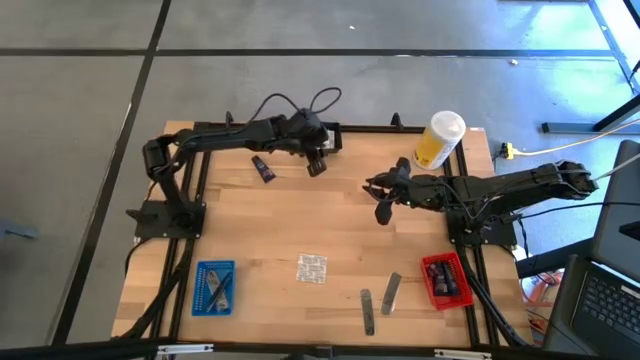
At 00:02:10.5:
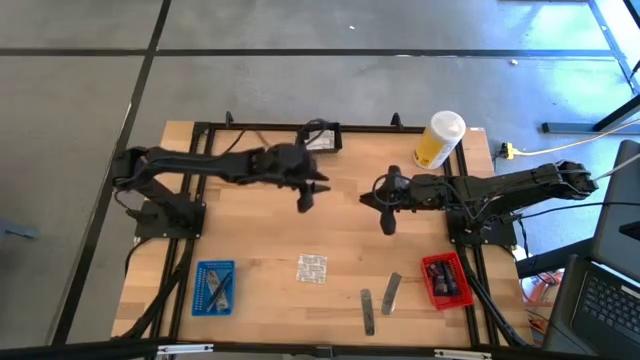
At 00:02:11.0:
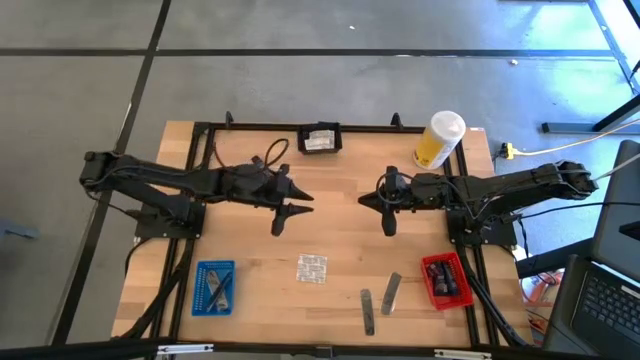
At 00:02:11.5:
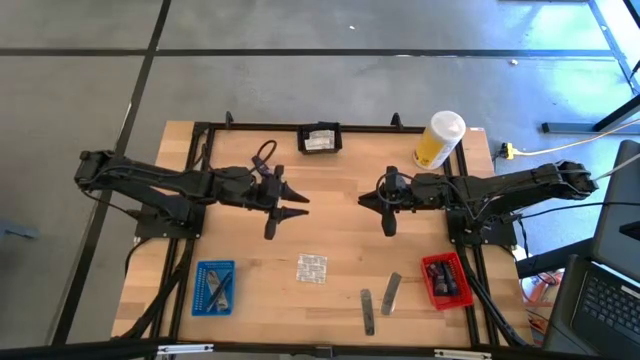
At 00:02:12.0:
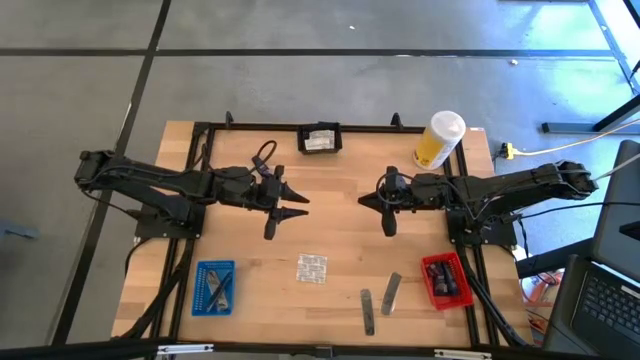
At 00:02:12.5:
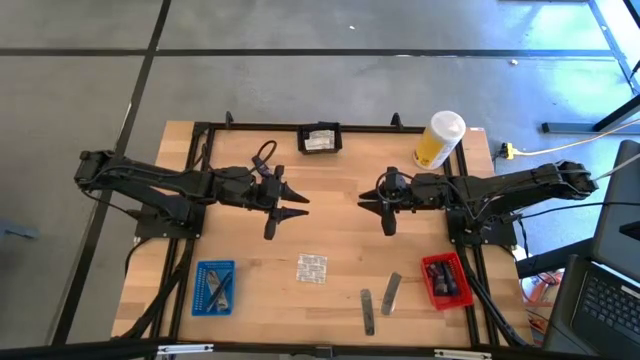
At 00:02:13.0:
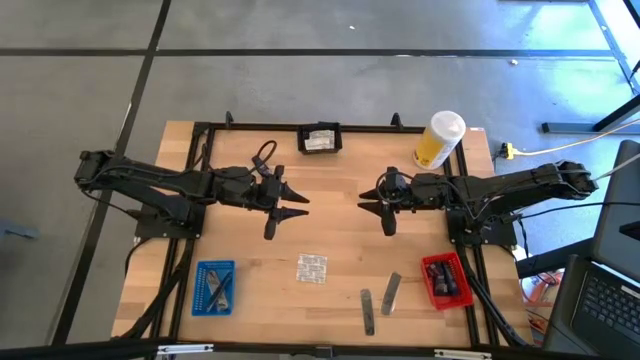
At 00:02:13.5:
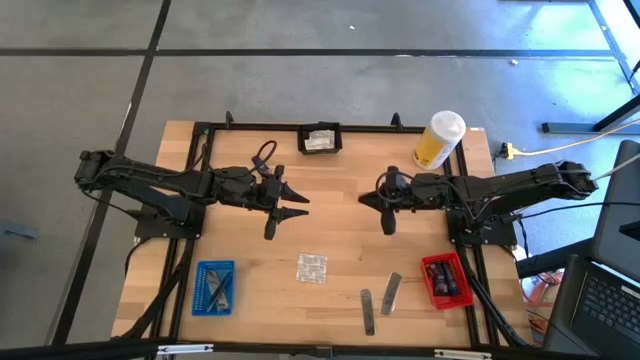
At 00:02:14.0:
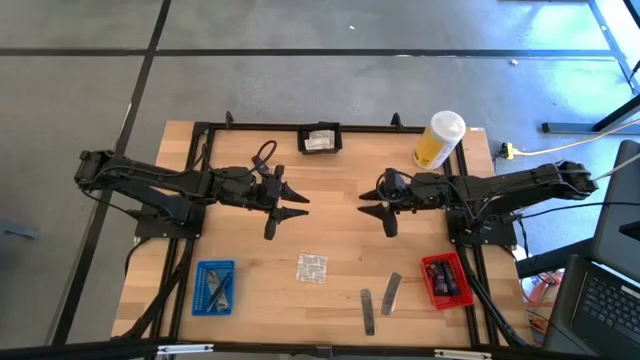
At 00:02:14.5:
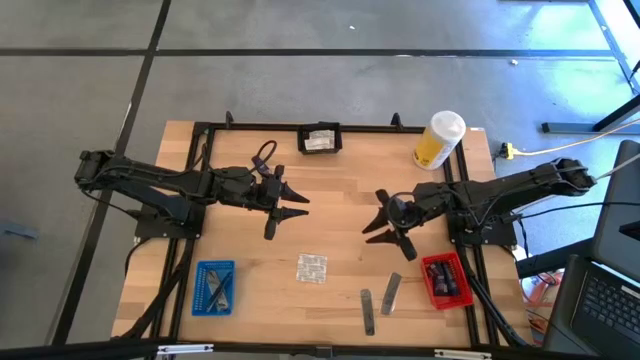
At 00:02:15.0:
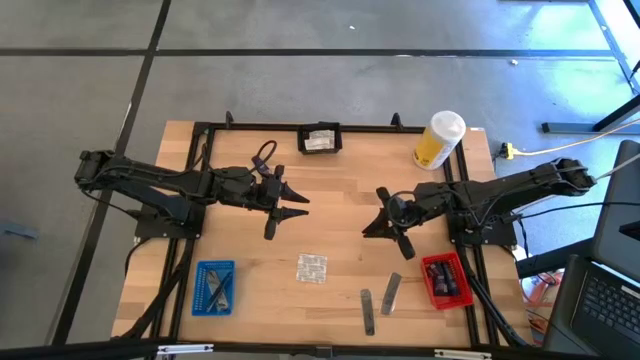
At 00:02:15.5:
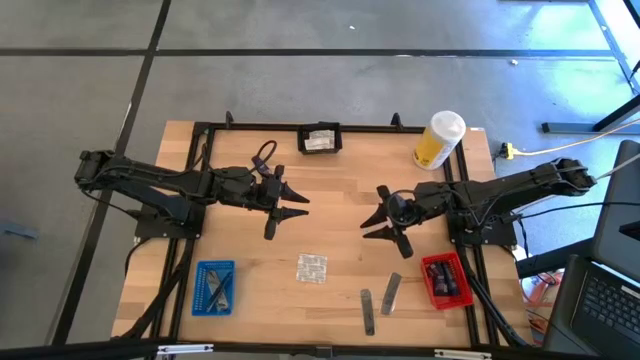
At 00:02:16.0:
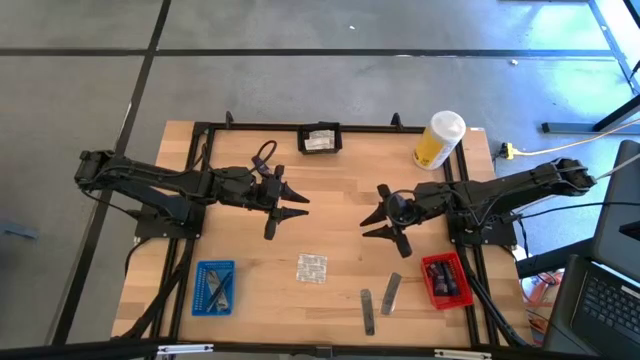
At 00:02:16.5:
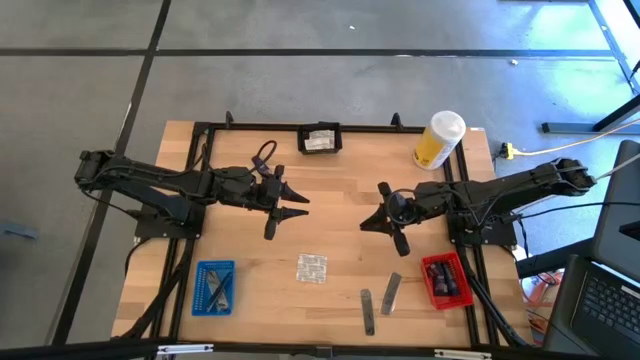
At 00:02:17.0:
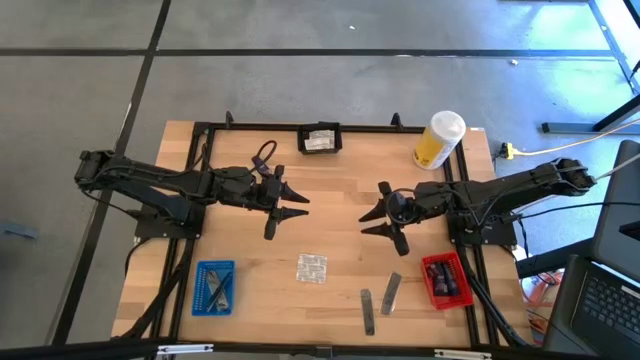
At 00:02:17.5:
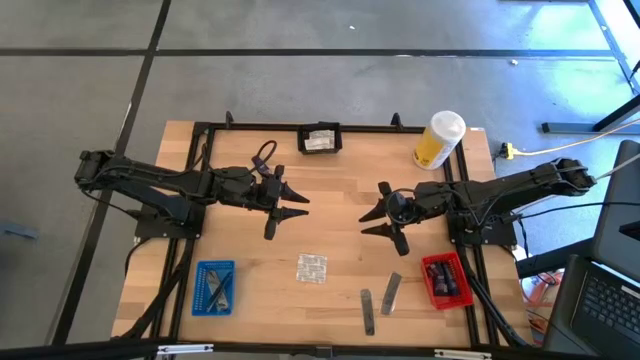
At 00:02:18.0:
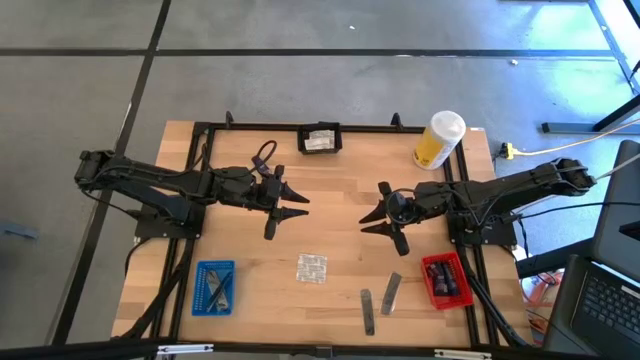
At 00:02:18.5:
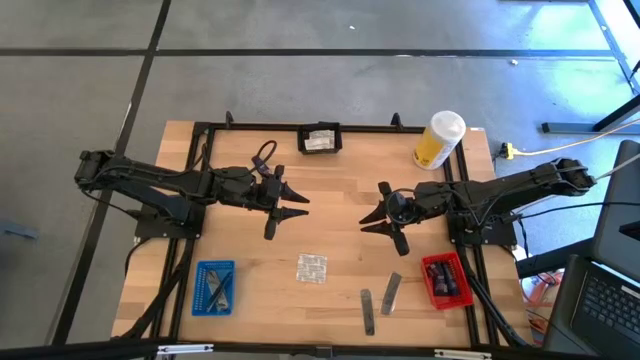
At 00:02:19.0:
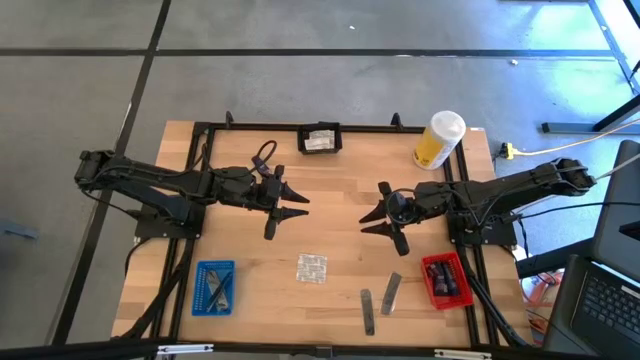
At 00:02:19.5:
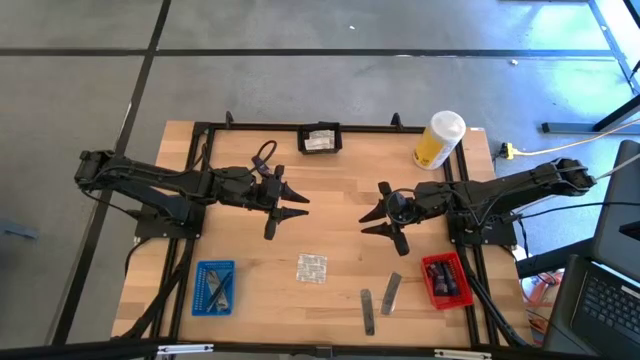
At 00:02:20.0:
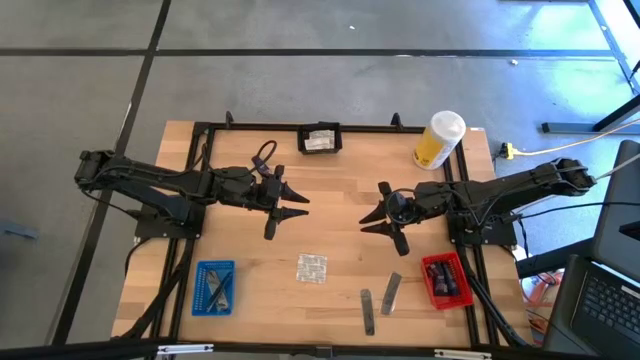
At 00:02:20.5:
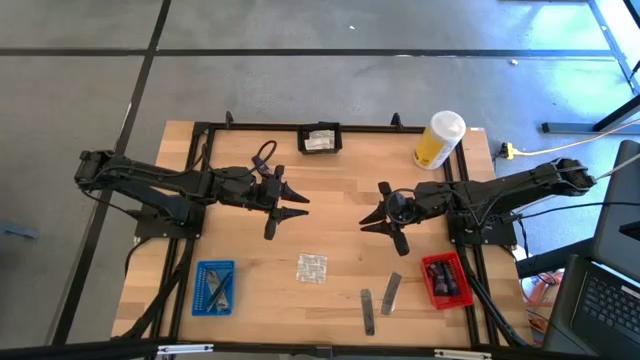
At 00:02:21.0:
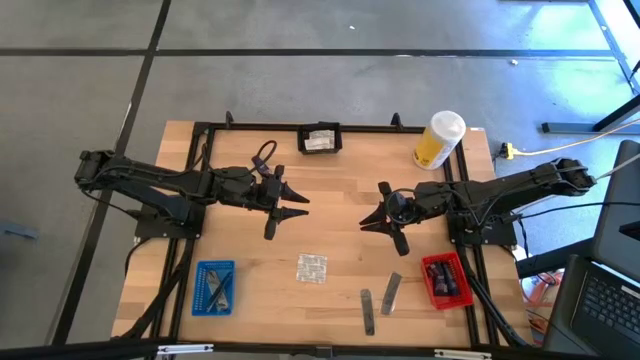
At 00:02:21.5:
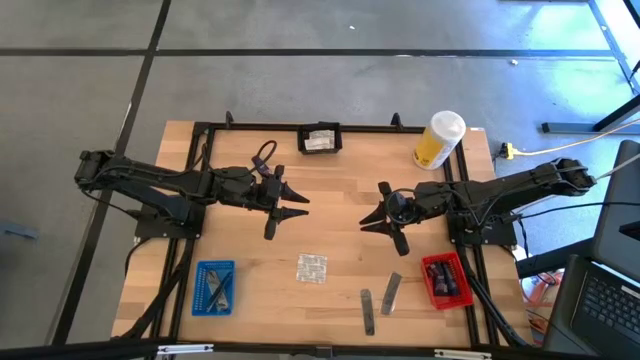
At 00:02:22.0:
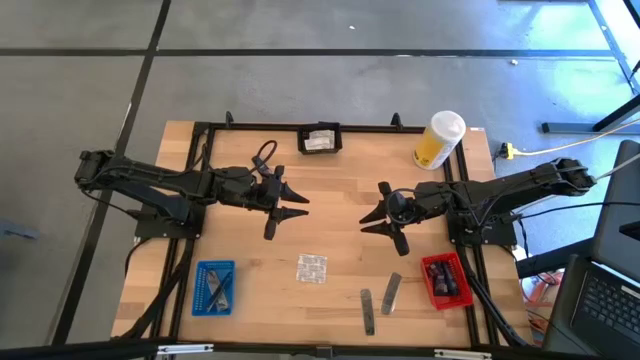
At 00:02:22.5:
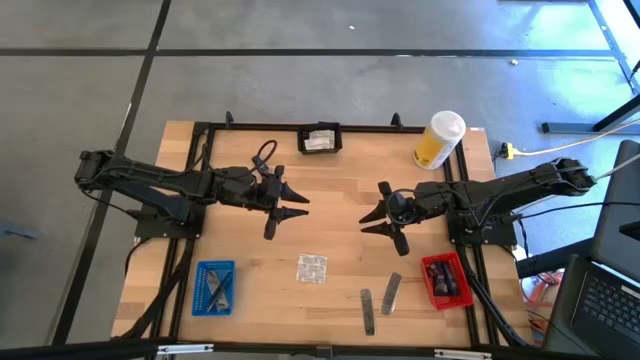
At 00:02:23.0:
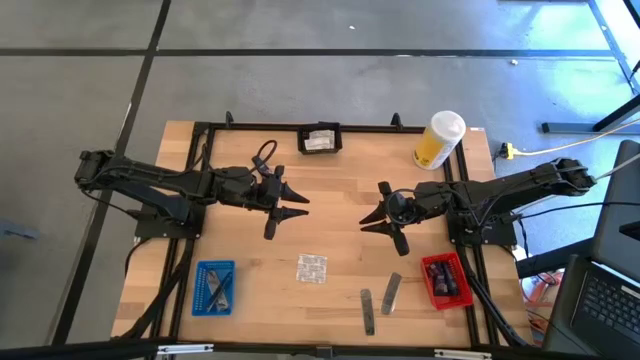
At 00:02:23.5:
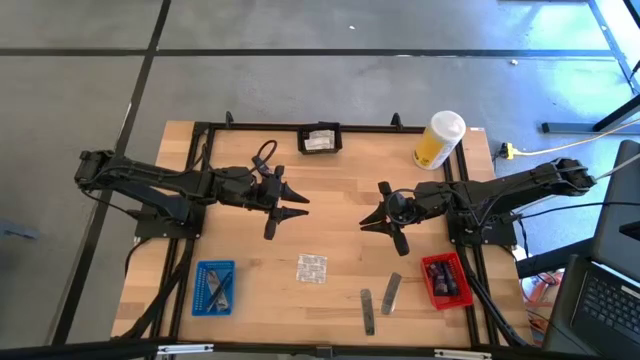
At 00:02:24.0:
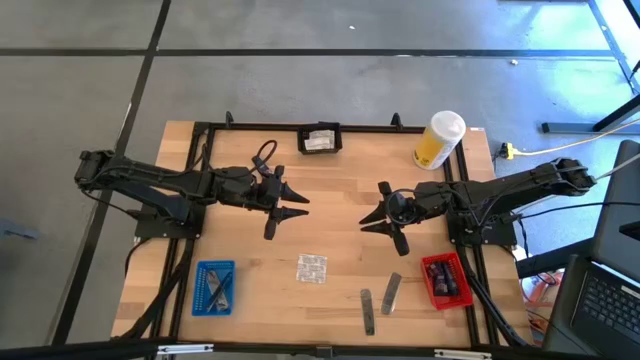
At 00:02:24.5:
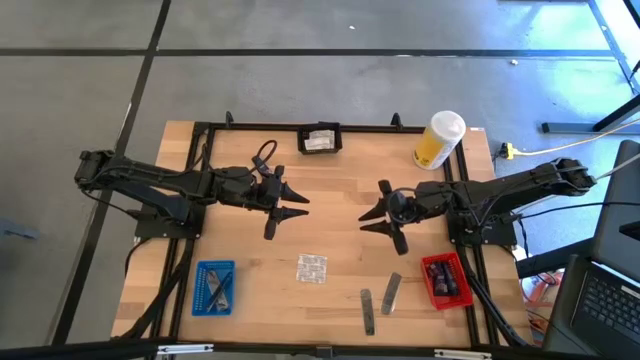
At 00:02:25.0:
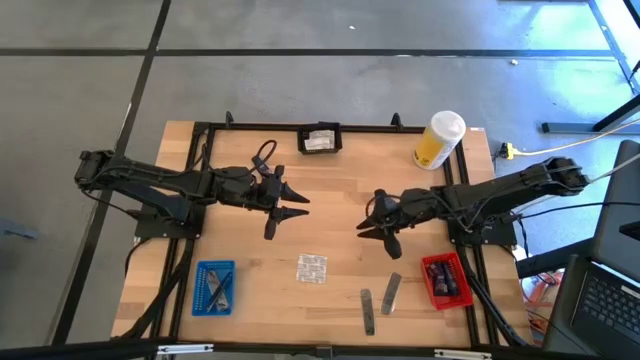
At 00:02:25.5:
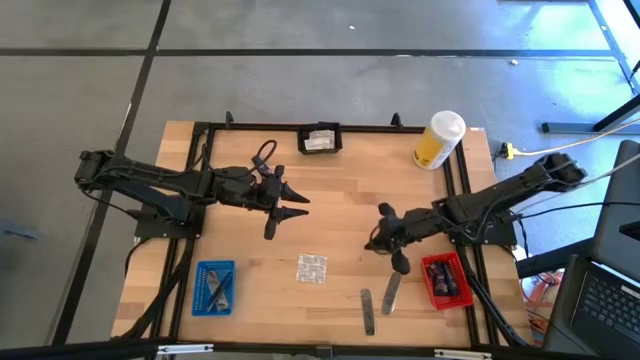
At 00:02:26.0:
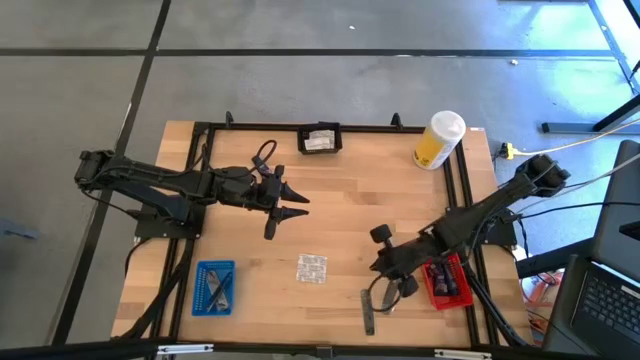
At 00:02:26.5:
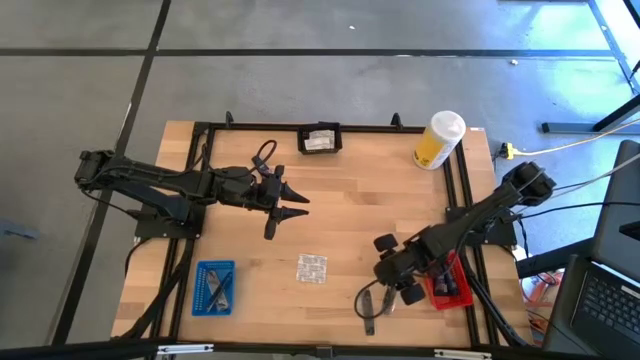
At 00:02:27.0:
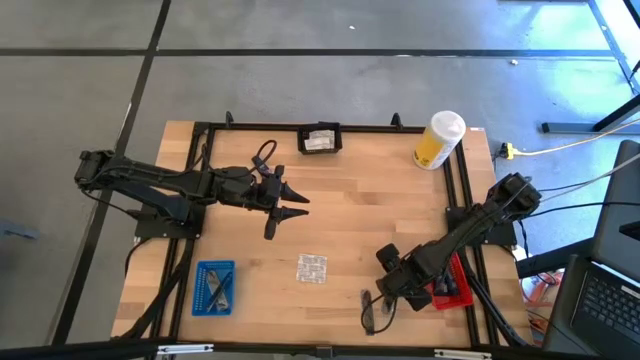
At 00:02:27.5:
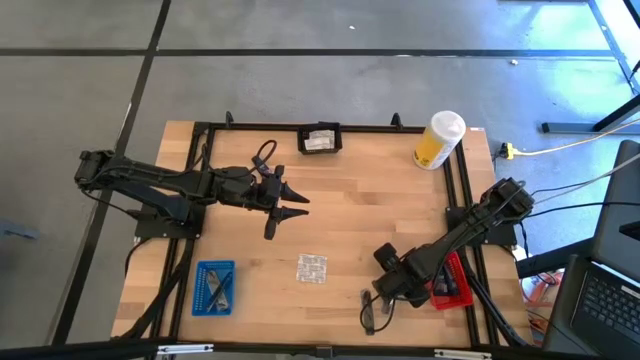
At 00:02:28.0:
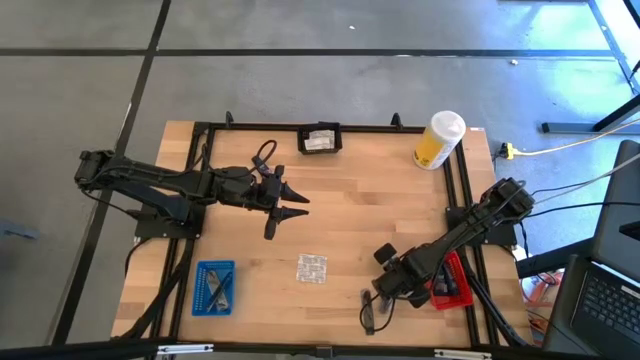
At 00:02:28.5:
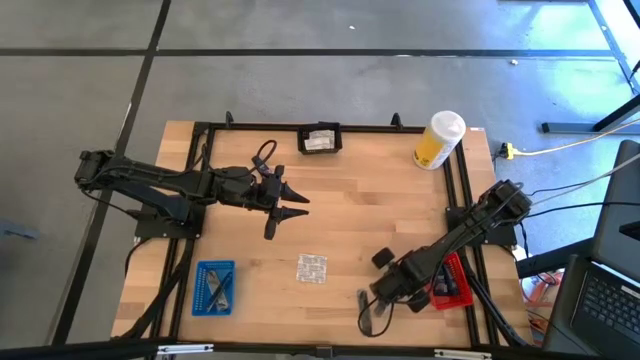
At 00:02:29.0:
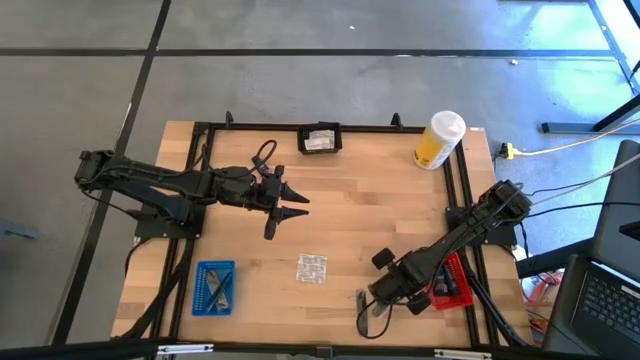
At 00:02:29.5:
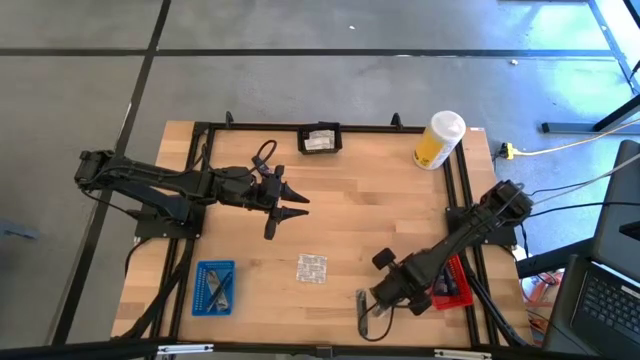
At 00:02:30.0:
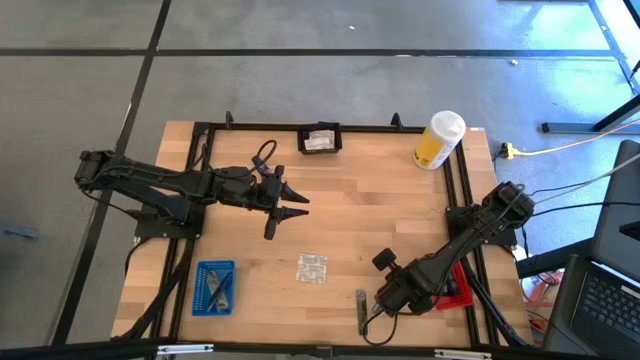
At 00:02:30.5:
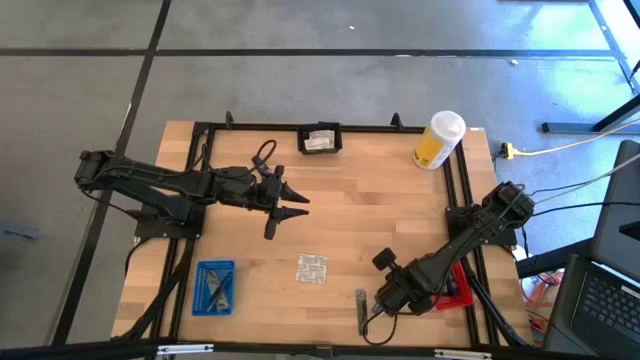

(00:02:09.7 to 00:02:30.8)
Task: Pick & Place Travel size toiletries
Put the black comb into the blue bin
